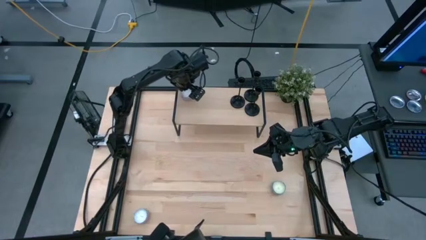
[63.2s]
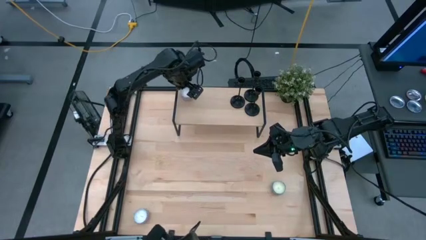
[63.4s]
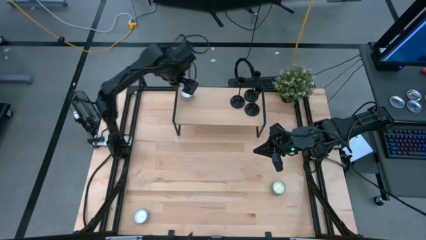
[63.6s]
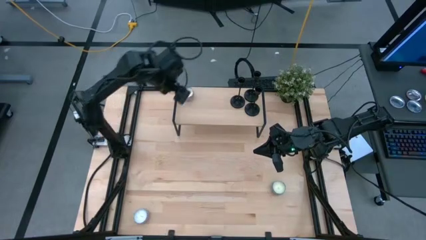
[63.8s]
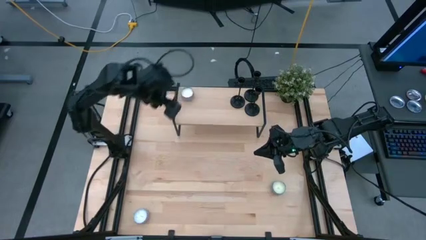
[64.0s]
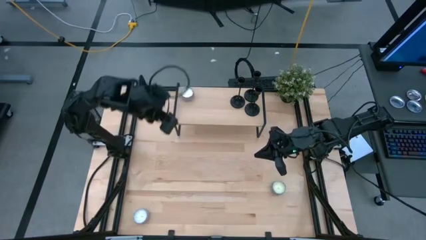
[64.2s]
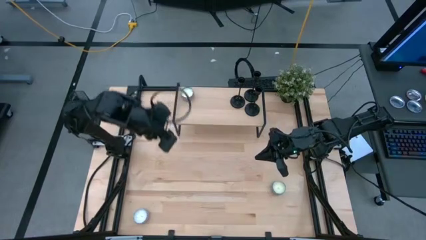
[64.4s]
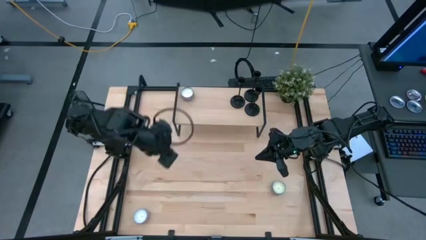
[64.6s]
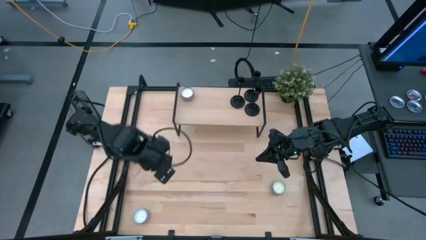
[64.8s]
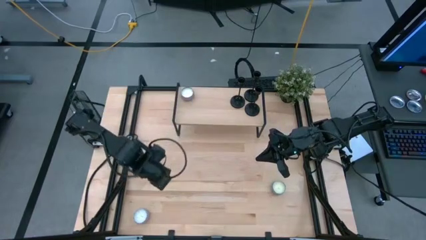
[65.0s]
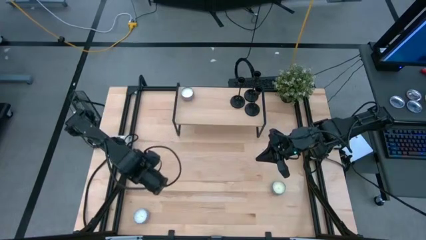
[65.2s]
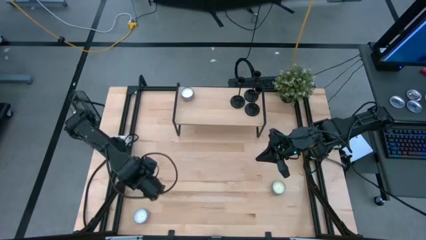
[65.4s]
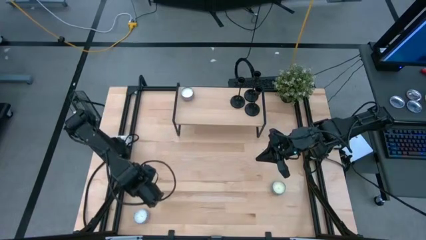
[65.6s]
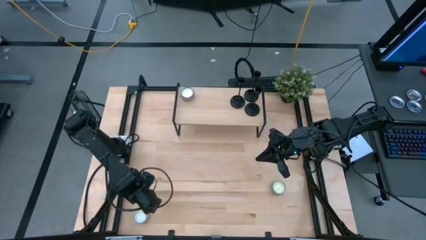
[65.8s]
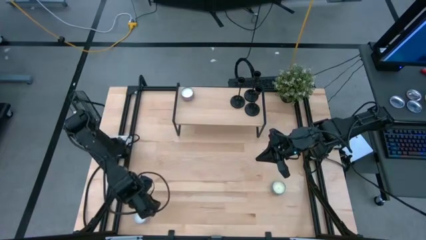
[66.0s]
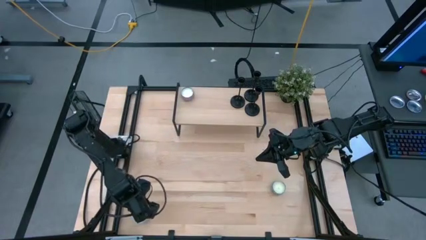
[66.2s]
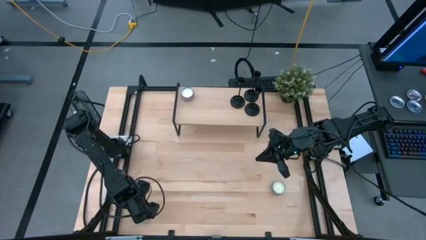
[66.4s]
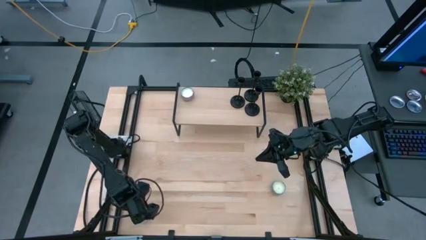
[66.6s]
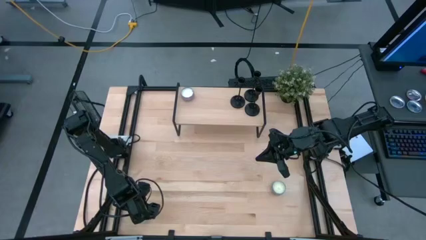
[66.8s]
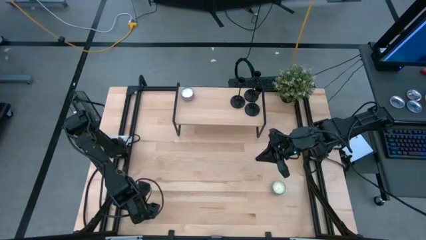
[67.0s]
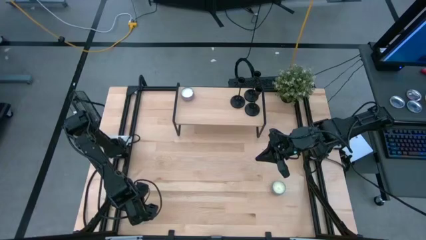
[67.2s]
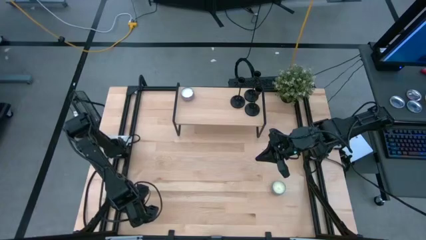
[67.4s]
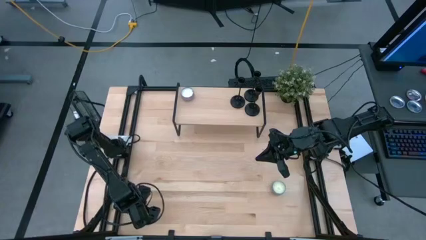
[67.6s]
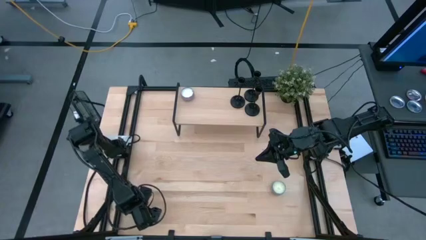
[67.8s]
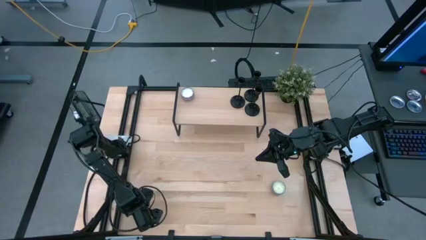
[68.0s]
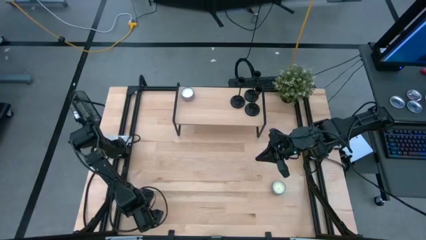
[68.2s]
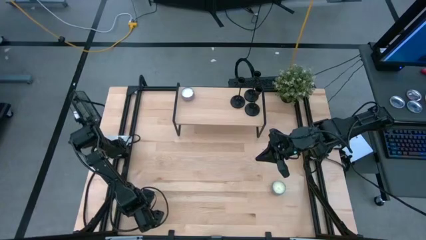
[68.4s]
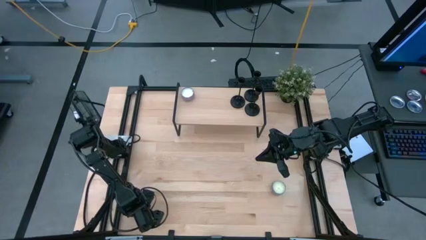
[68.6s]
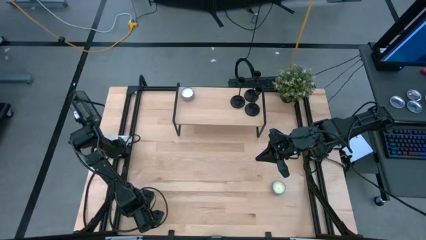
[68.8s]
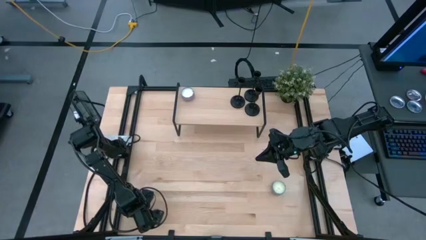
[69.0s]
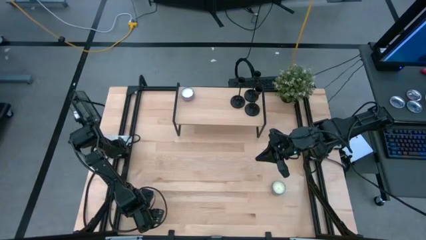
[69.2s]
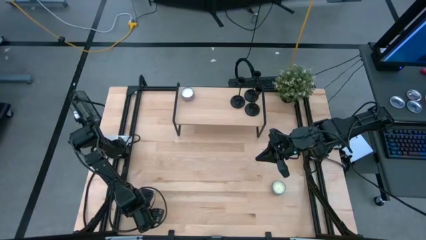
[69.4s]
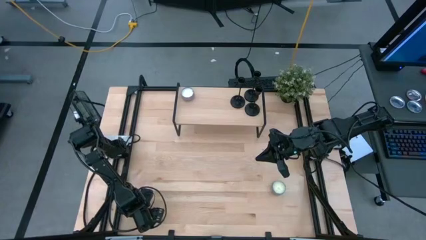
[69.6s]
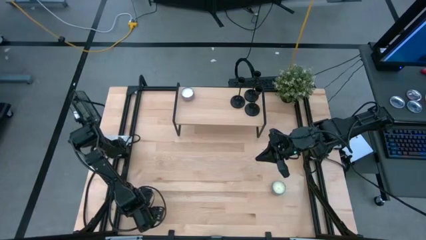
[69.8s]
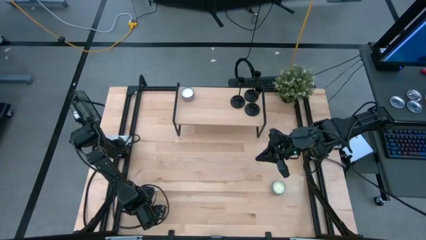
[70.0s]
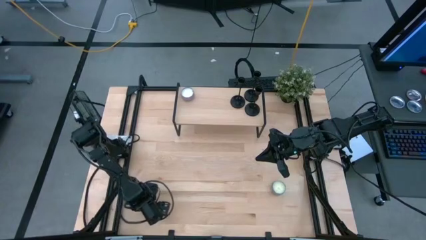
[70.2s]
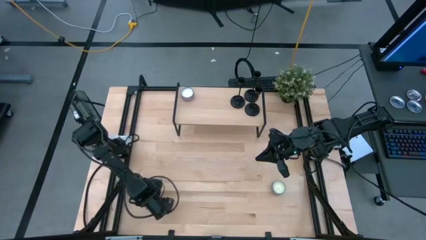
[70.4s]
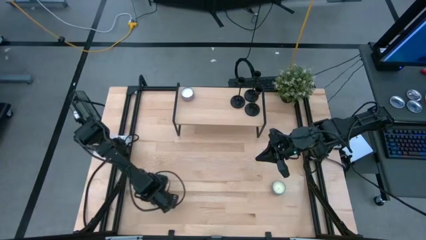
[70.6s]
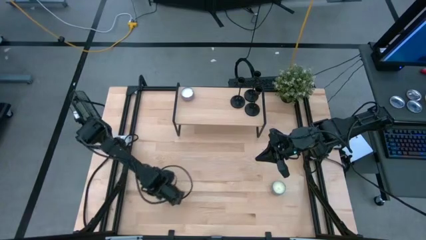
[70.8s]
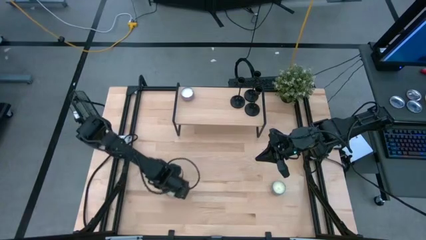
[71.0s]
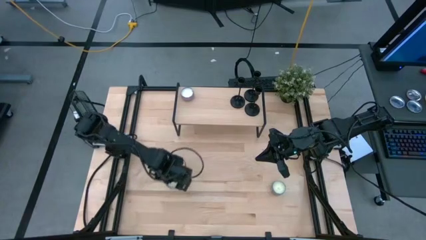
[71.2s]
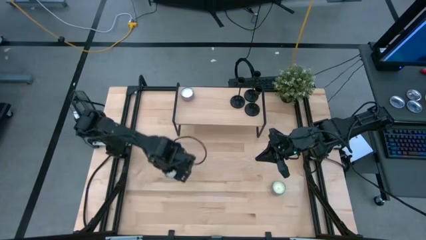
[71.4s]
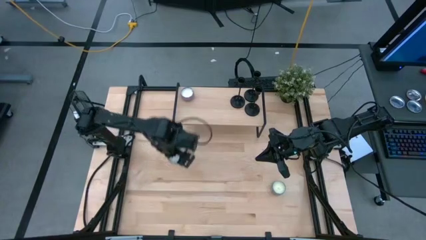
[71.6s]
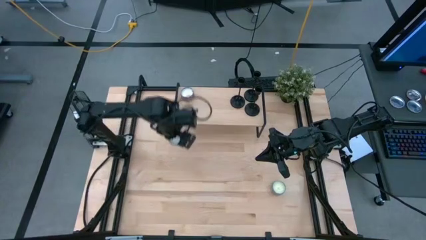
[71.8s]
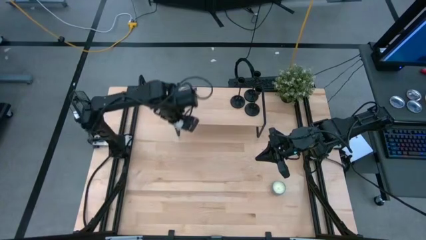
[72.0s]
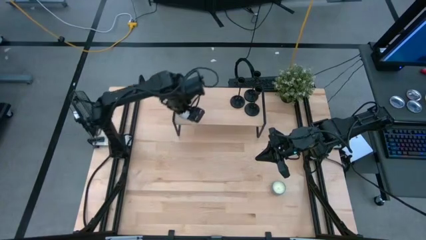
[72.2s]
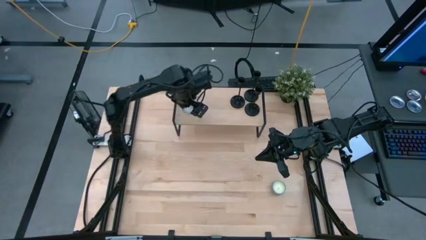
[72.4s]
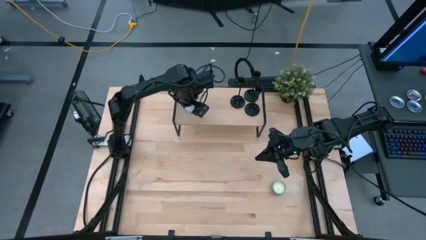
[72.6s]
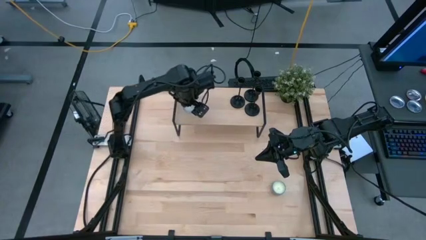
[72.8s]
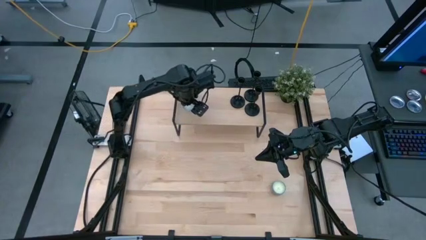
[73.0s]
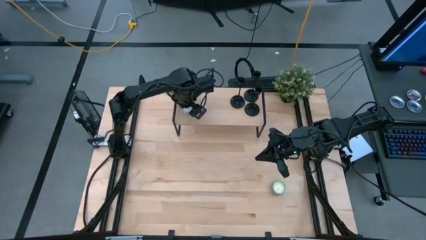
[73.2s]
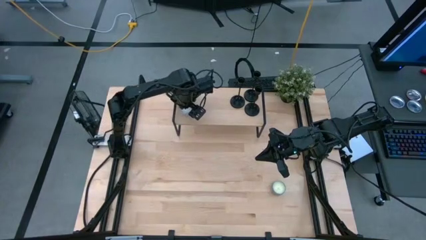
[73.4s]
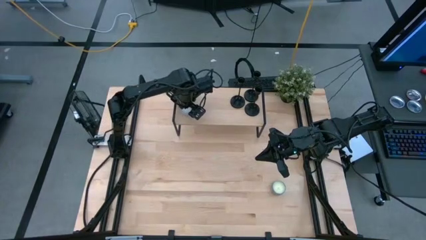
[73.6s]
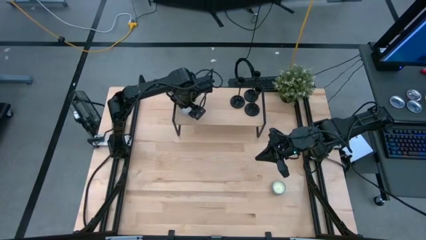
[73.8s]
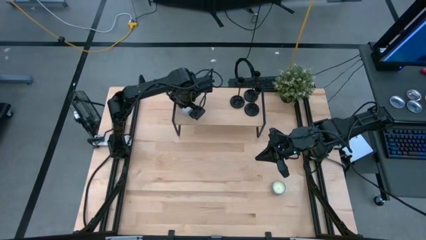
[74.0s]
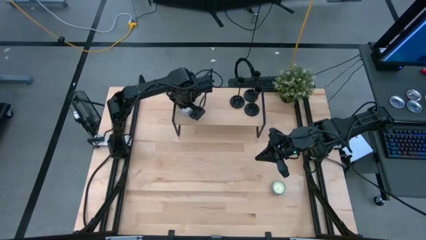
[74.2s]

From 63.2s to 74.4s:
Task: Pick & Place candle stick holders
Put the violet and gray patterned scented candle on the shelf

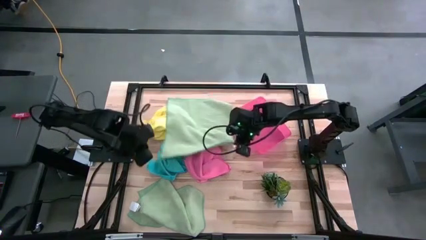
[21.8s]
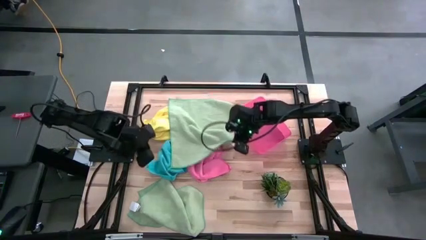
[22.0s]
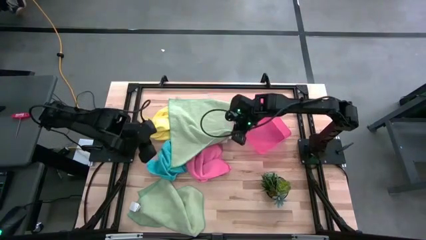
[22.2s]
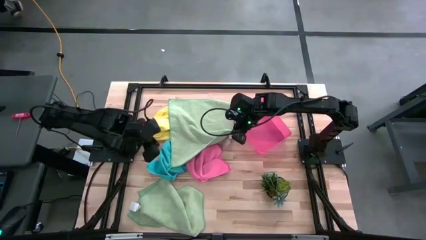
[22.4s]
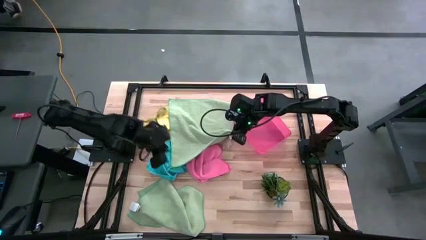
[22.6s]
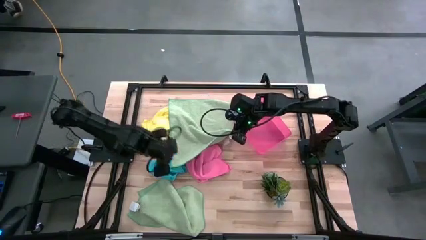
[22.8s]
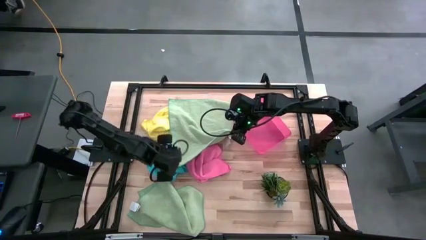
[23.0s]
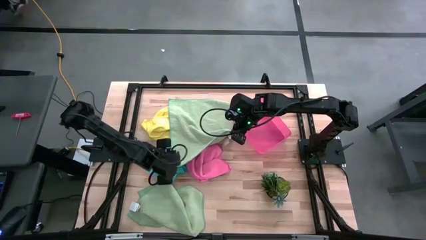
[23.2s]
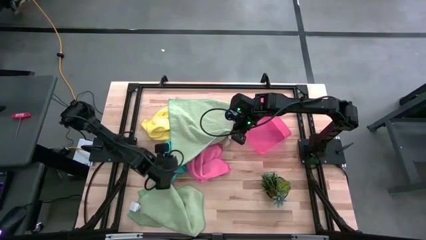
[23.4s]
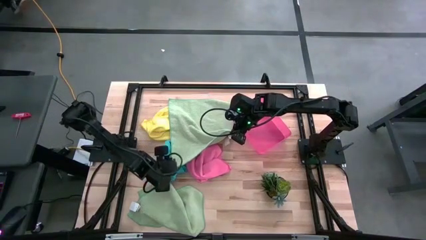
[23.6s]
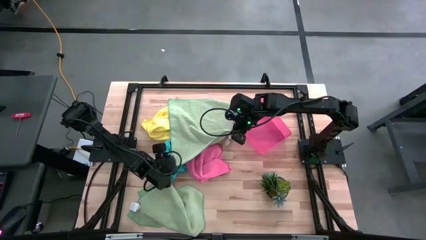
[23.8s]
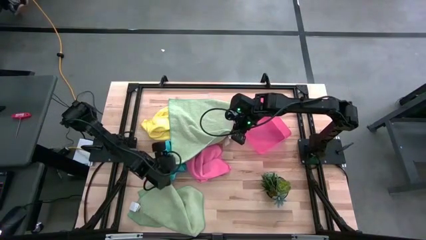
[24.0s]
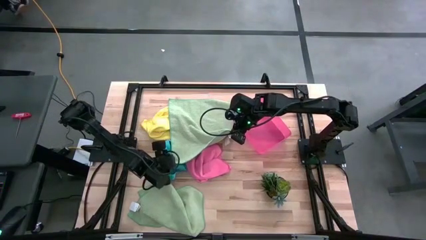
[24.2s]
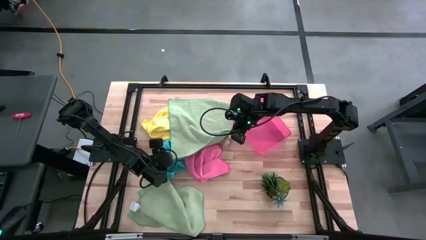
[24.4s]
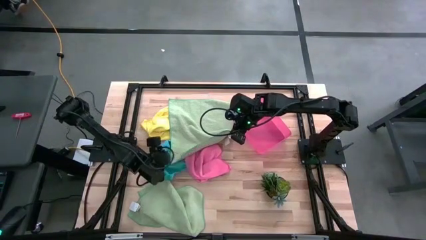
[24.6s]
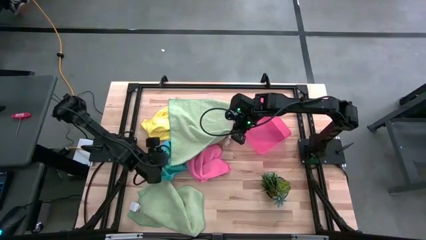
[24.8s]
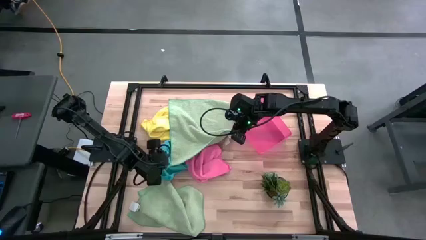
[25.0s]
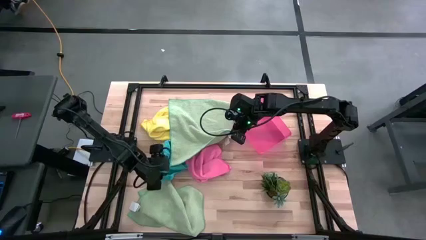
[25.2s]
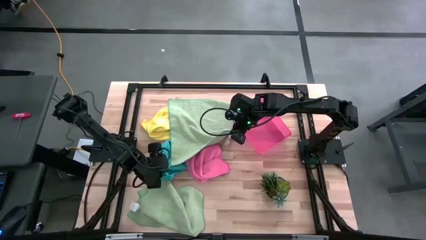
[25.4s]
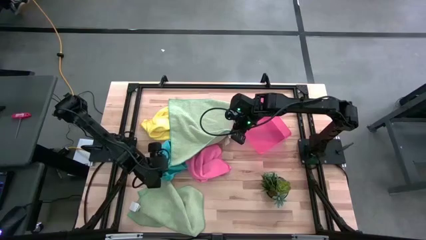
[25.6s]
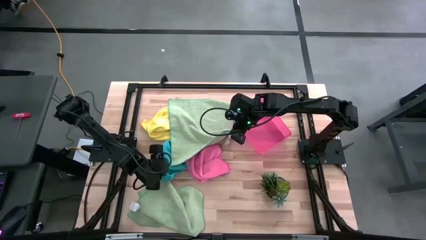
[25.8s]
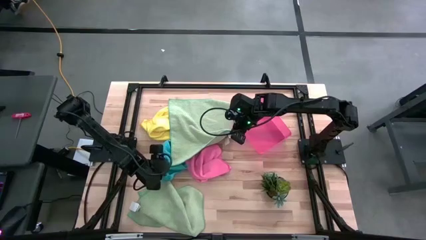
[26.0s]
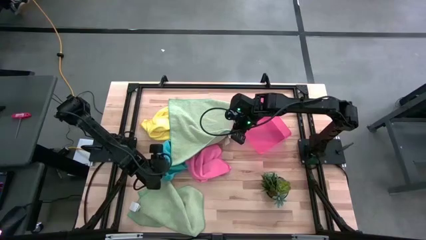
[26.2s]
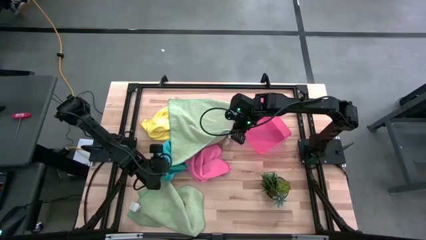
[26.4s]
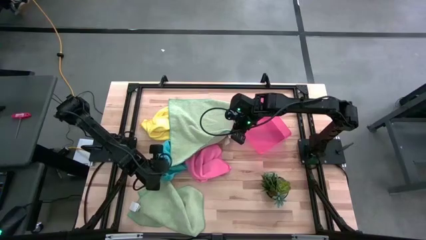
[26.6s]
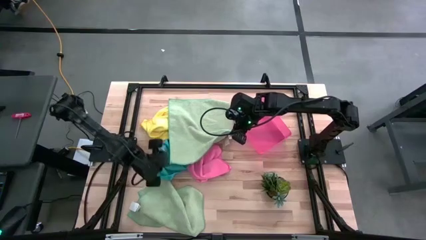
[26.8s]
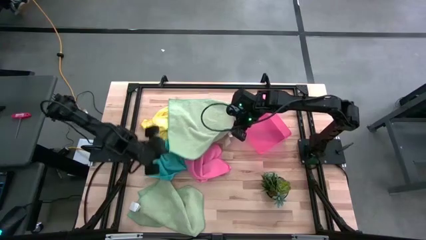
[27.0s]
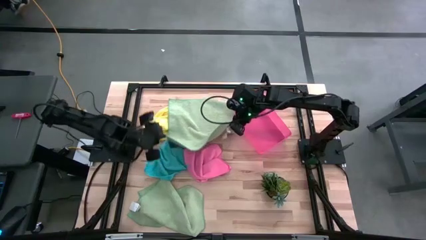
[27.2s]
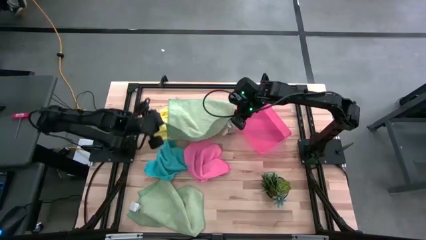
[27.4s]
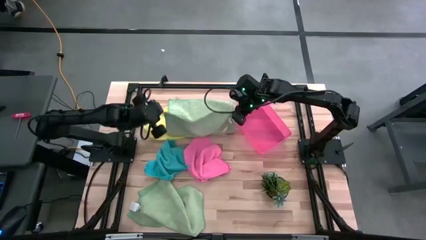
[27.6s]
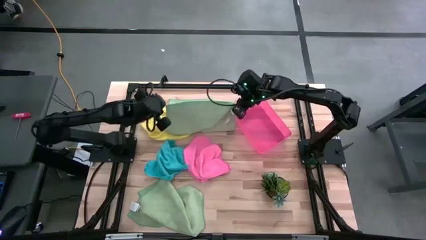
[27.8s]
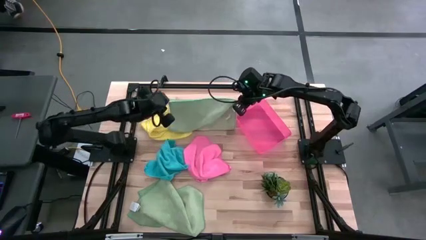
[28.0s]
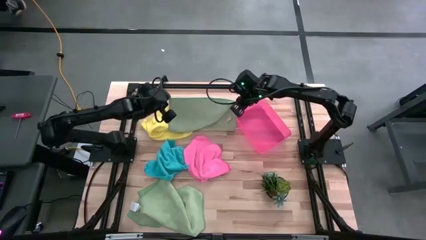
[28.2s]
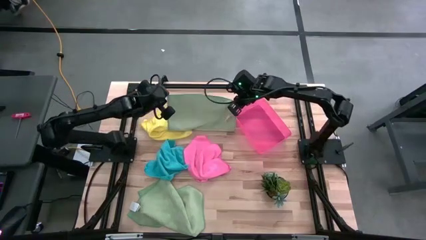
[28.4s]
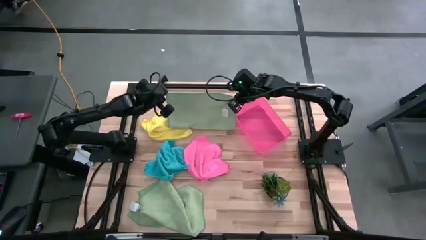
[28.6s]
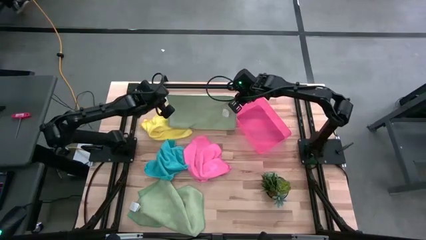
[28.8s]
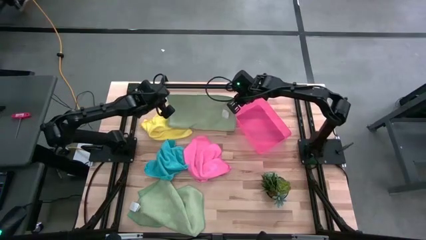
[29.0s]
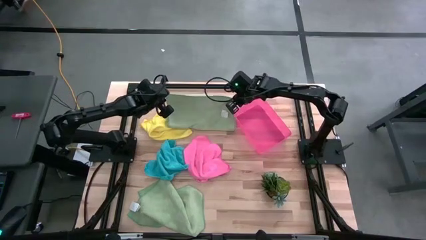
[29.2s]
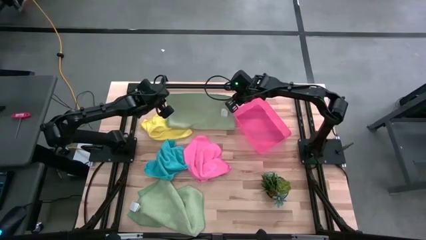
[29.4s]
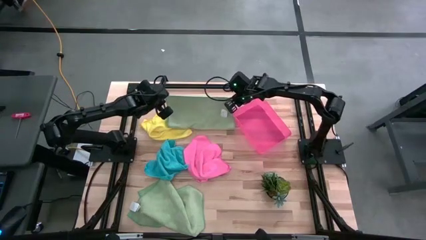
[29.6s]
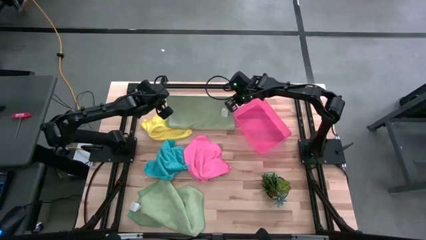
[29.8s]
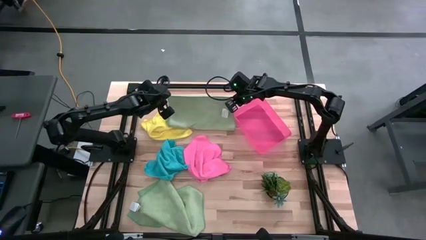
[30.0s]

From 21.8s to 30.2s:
Task: Fold microfiber towels
Fold the top light green microfiber cloth
